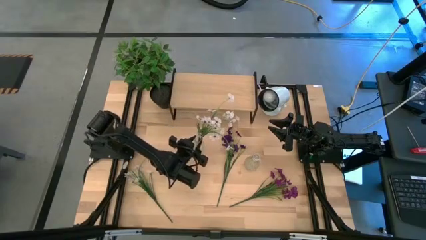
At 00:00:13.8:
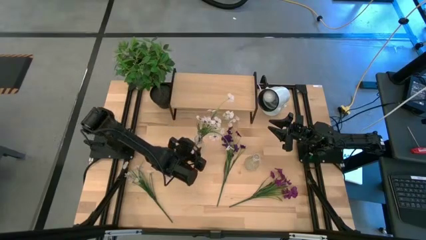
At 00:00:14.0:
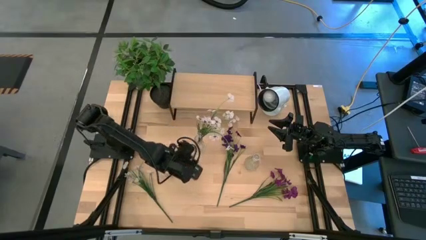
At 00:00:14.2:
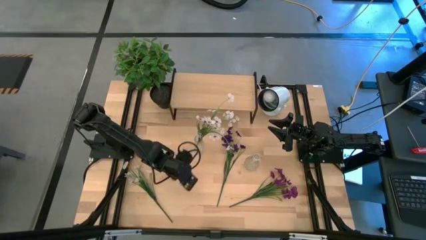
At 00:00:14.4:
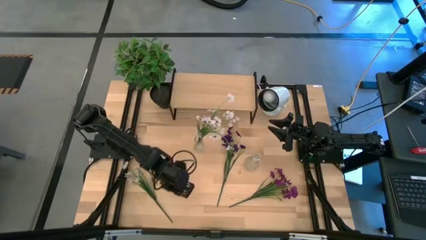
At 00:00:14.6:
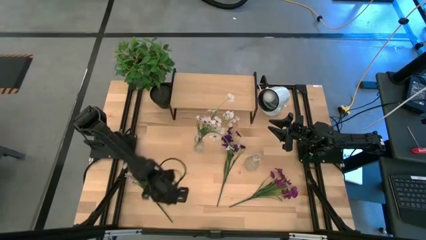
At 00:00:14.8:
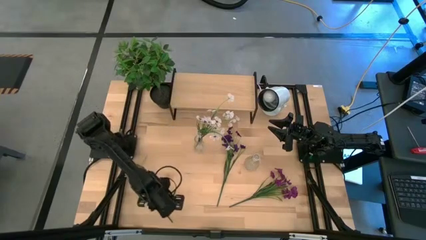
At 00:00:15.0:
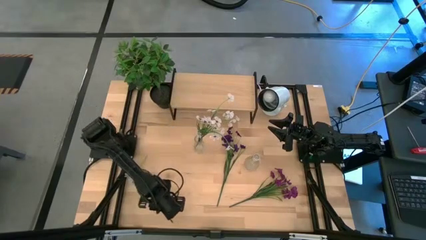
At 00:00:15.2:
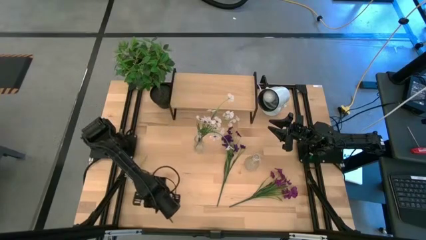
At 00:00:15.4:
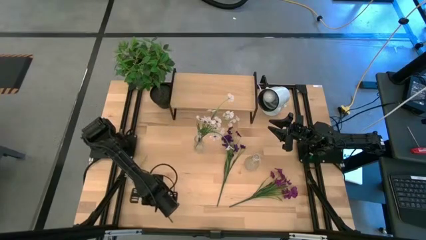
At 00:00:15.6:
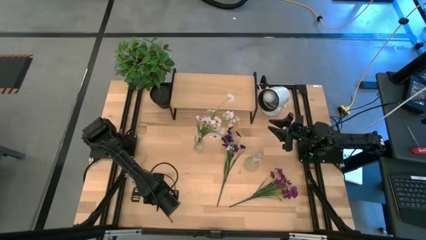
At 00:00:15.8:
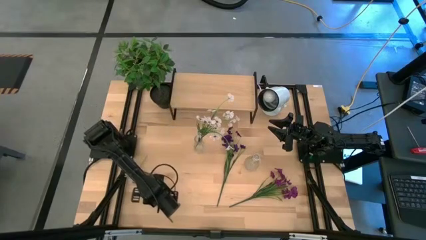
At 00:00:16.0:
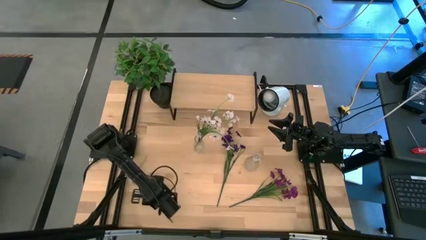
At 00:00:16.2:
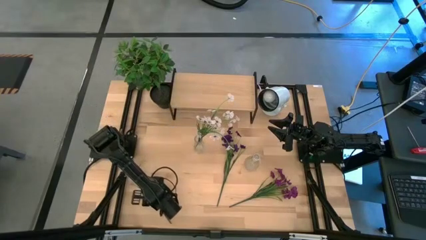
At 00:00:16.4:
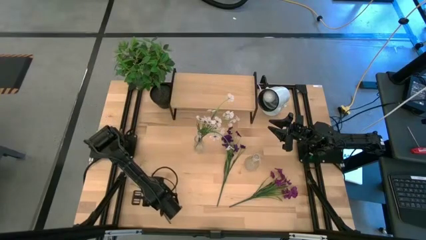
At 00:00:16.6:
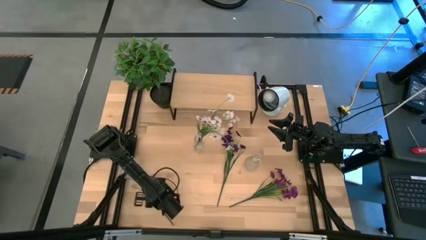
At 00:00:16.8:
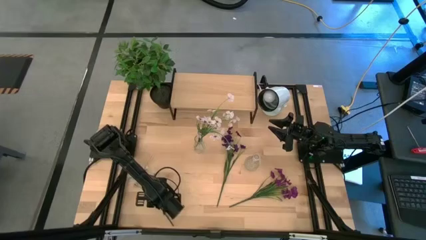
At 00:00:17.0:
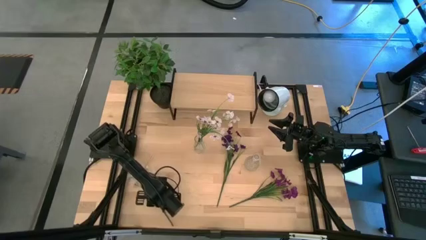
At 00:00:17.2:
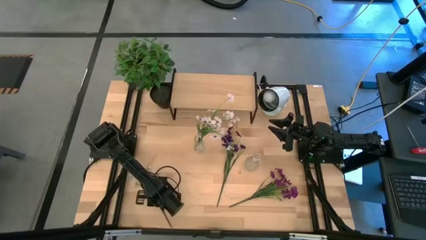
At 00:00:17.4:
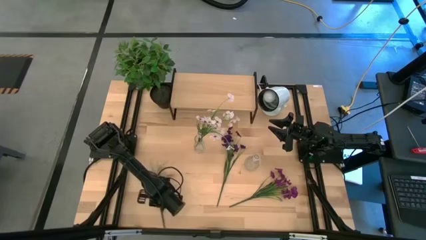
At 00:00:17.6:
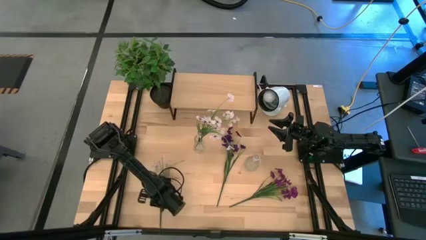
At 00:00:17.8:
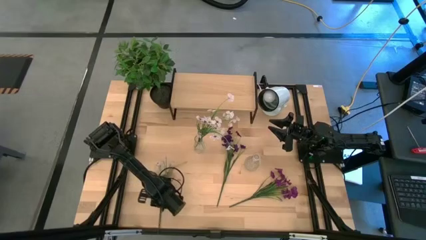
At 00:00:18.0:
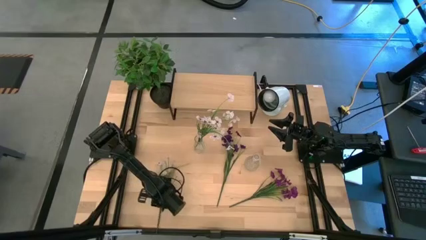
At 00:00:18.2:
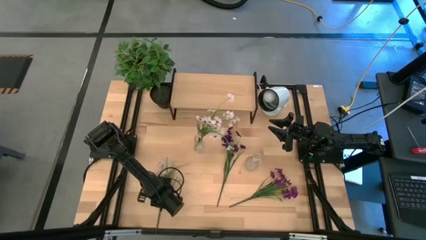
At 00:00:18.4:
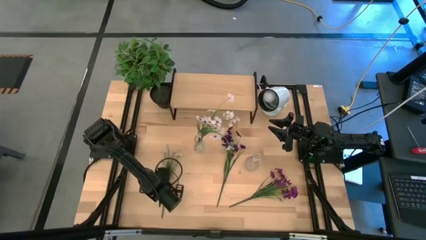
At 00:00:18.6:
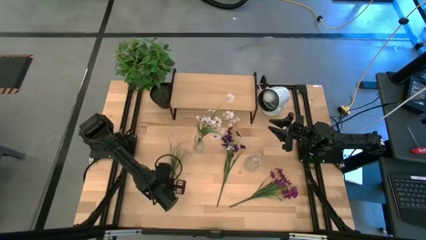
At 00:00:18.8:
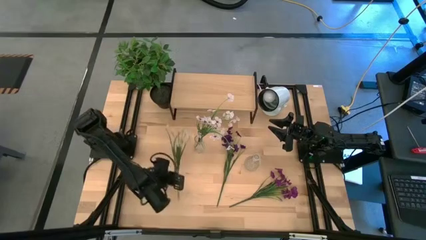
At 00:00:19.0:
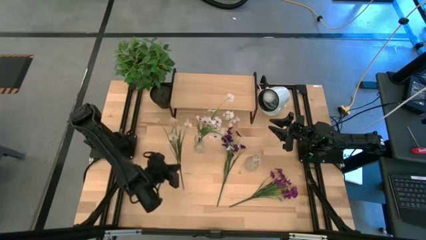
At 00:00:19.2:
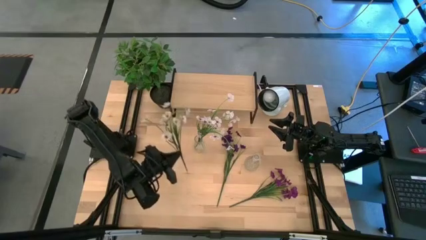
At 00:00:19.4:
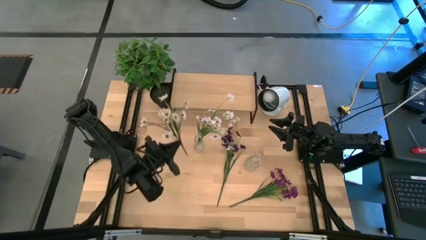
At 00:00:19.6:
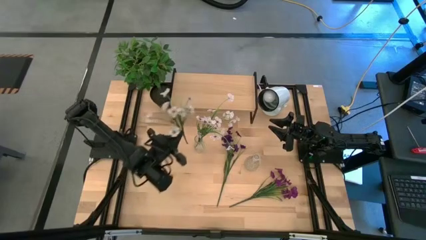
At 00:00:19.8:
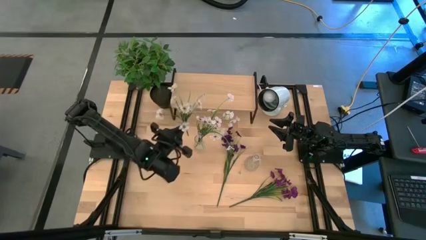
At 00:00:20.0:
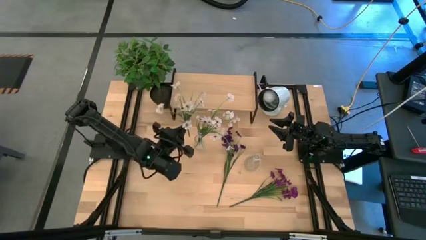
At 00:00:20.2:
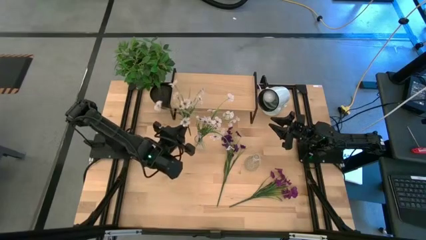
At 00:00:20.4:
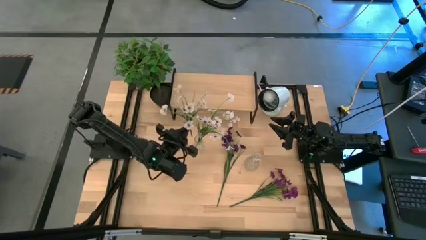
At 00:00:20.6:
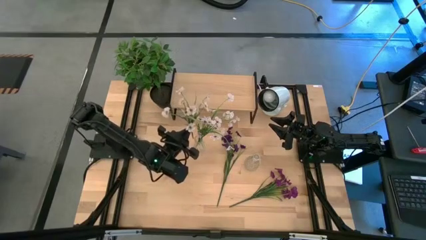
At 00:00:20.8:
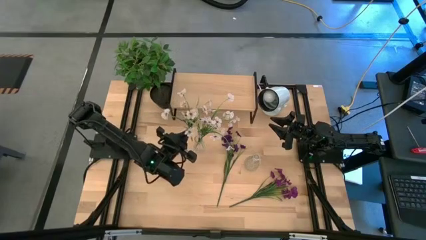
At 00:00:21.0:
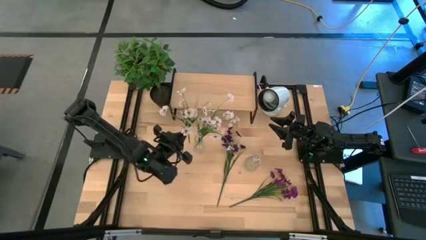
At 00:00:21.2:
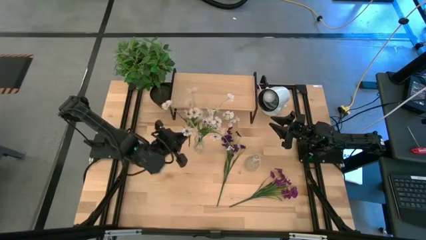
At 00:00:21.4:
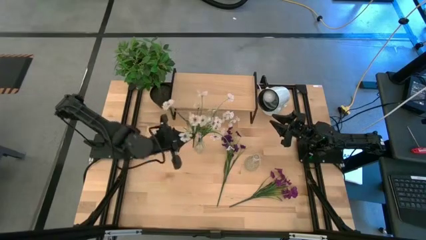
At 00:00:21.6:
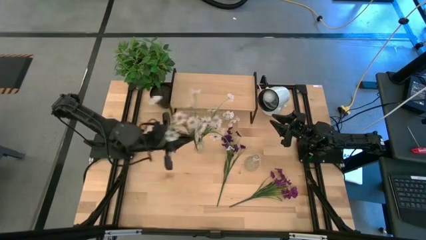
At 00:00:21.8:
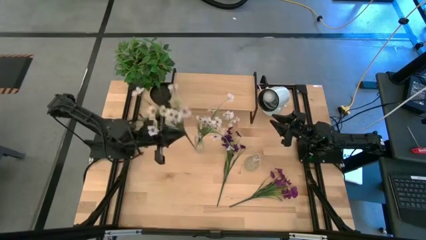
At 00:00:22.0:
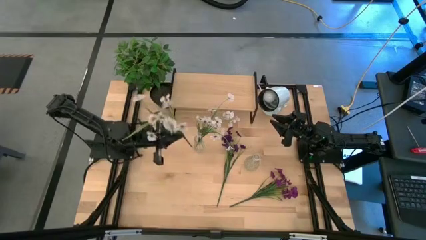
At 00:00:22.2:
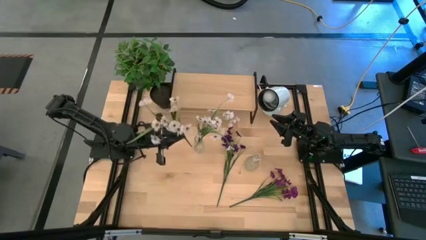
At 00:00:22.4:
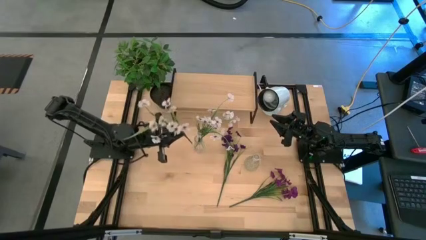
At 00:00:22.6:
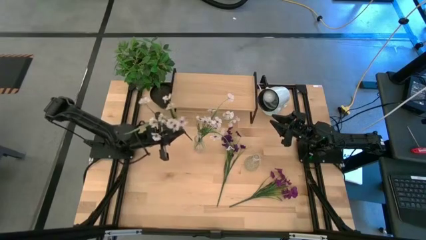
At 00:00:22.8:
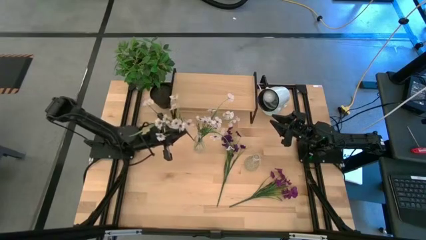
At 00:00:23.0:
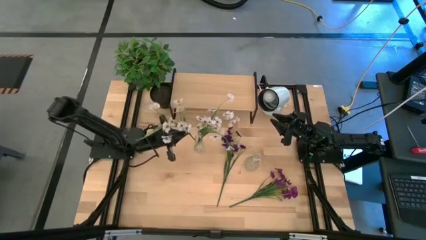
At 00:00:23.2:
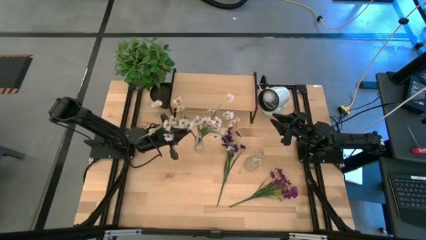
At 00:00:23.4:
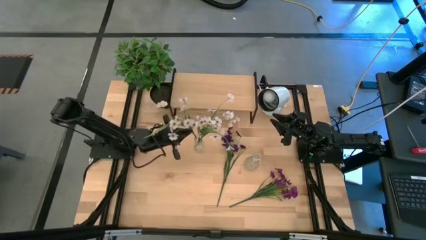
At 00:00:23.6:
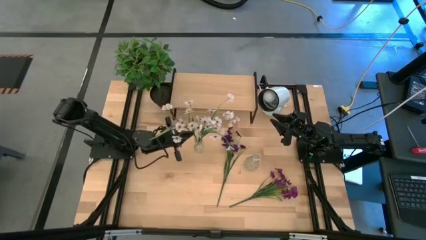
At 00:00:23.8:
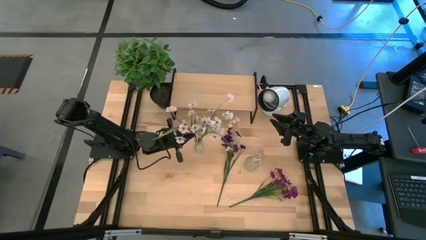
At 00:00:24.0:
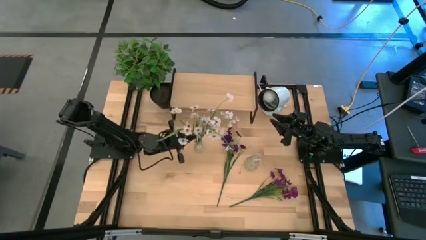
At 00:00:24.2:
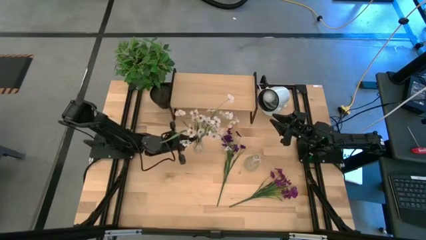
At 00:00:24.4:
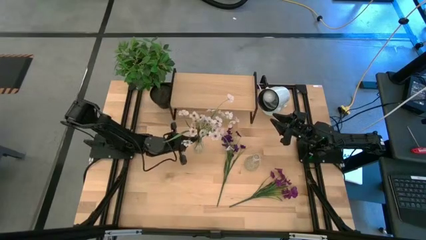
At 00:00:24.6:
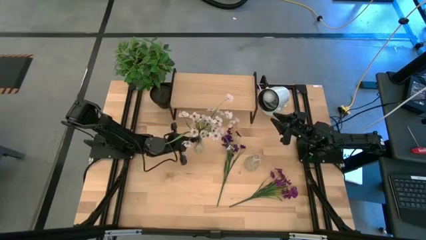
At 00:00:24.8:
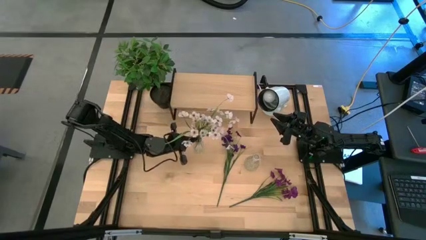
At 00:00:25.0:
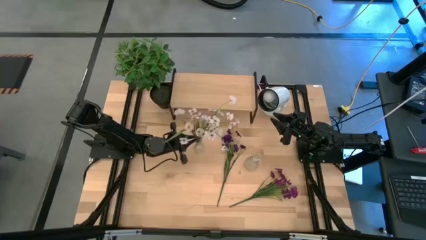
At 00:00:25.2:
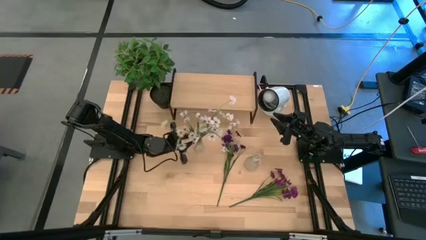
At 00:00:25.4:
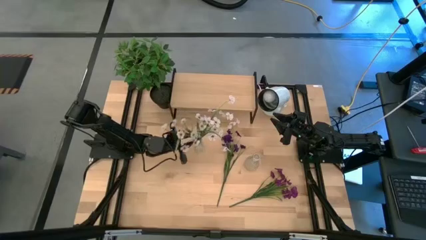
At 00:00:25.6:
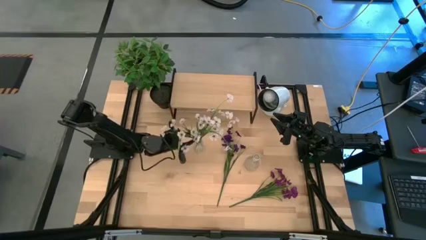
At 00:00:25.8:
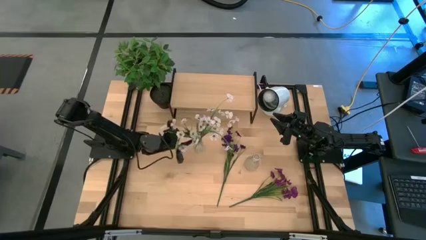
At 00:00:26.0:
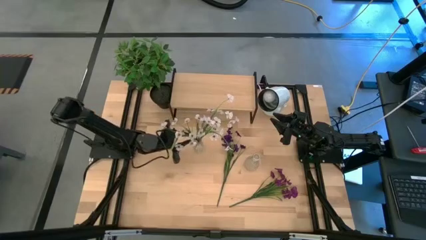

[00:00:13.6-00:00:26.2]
Task: Pick and place flowers into a vace then onto a shelf
Put the white flowers into the left transparent vase

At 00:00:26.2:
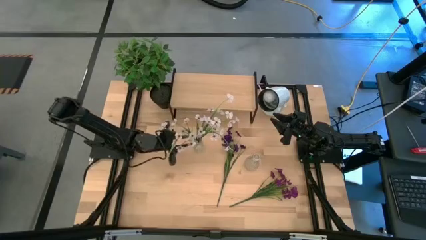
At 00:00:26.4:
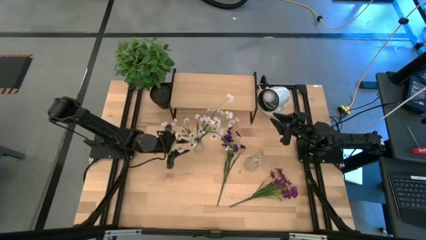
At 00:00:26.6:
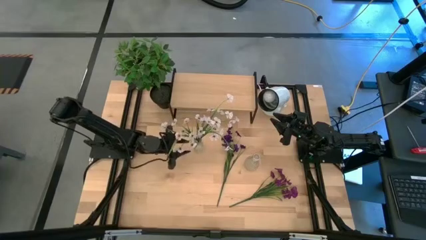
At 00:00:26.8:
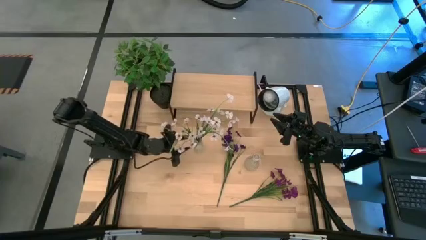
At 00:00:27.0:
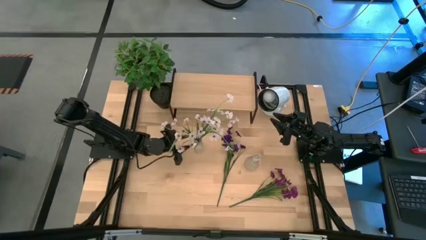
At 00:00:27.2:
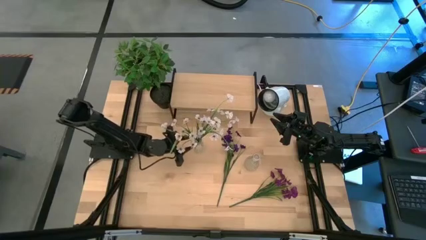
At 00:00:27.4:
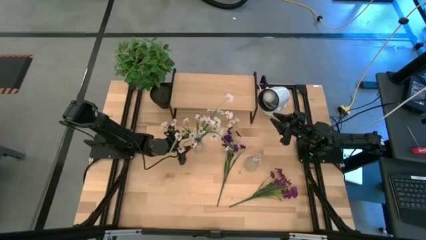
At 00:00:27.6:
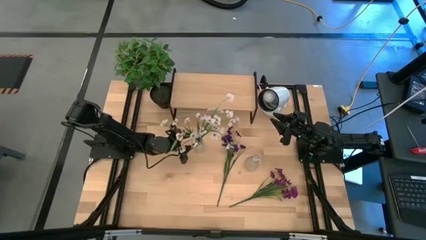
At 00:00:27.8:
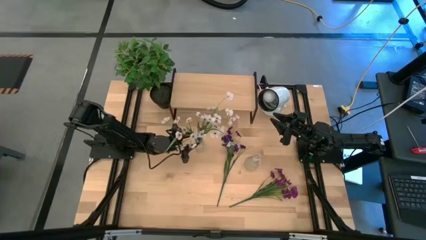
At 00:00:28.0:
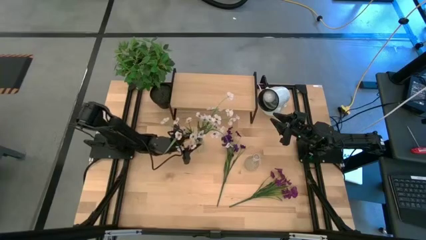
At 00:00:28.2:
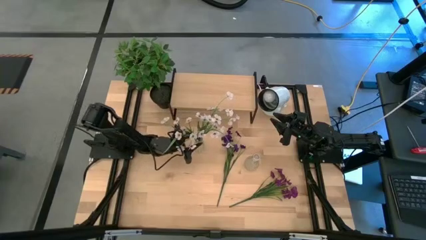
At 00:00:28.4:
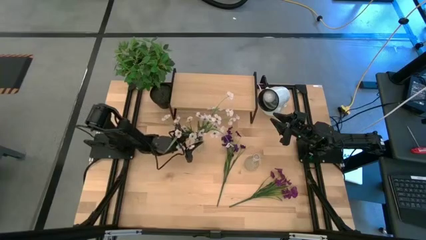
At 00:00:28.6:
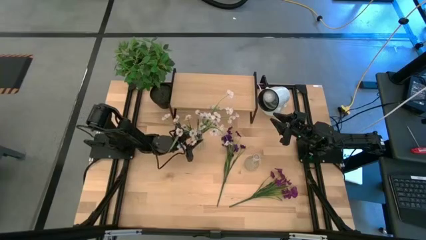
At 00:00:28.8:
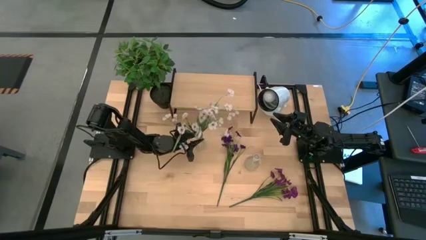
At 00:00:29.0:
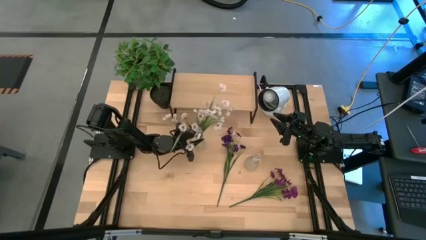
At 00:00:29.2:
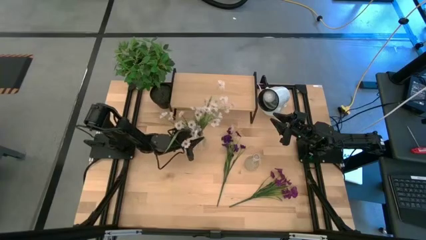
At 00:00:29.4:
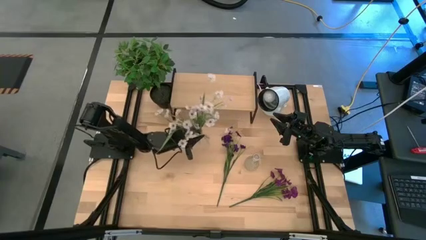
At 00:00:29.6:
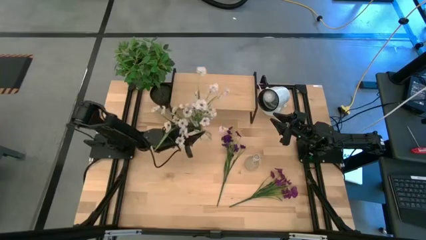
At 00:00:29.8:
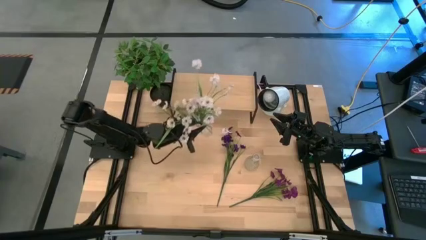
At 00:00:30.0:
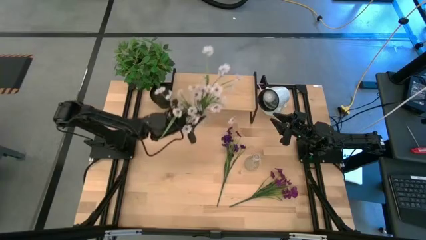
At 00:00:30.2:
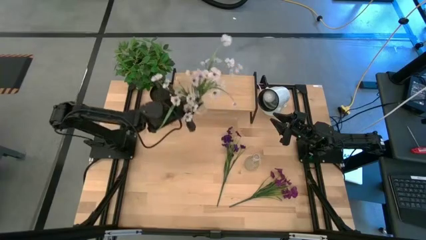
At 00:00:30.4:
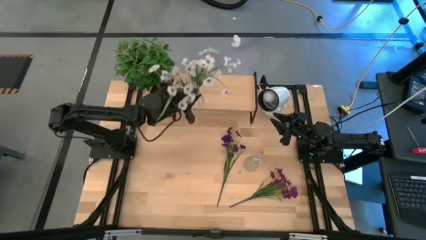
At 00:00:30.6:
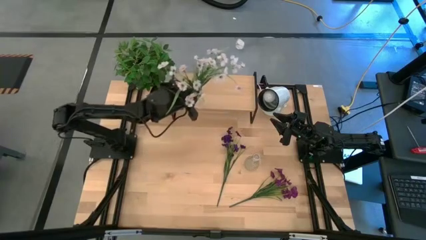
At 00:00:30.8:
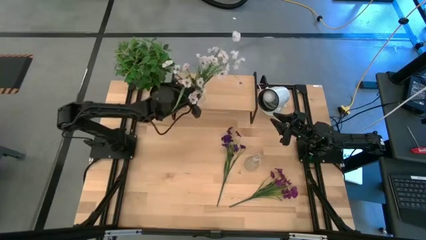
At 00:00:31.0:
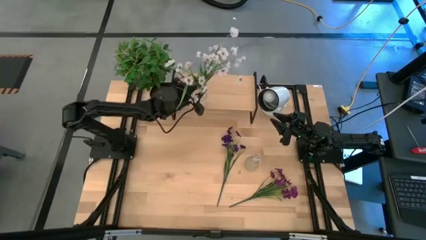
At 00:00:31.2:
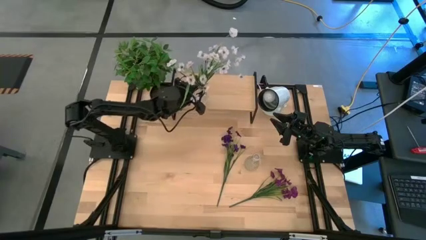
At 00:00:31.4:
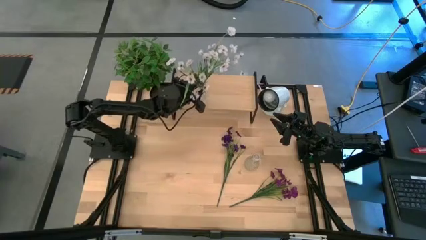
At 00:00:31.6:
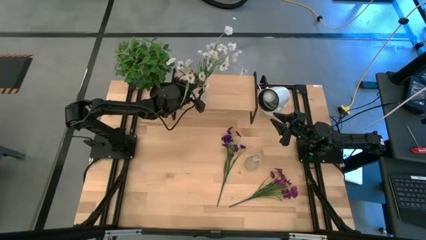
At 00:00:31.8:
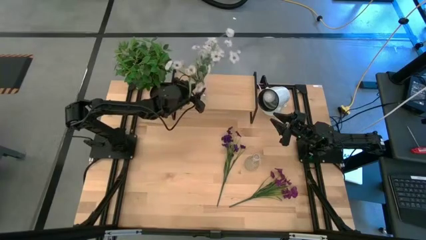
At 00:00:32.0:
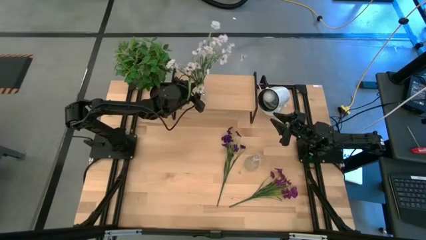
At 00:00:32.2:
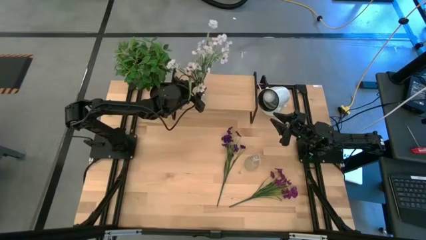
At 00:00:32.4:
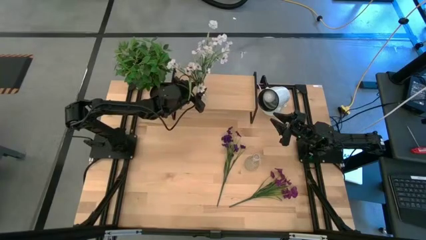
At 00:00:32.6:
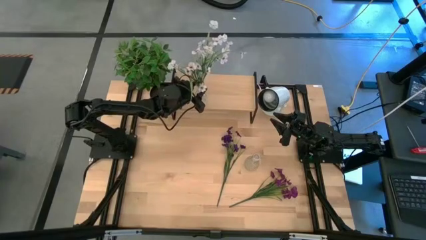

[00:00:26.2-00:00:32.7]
Put the left transparent vase on the shelf
